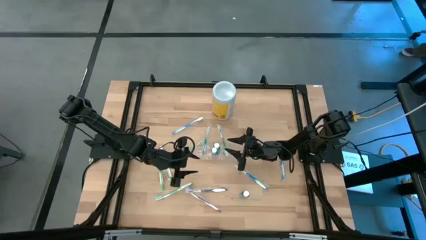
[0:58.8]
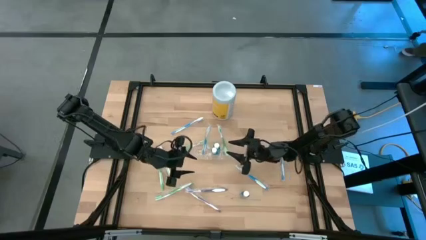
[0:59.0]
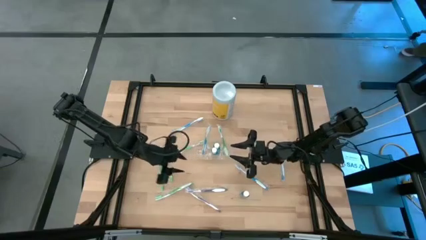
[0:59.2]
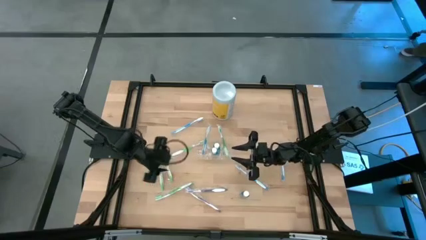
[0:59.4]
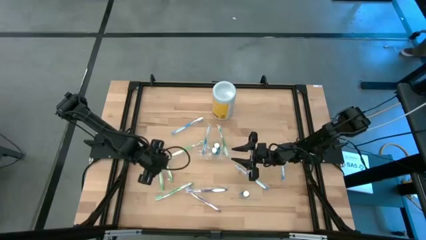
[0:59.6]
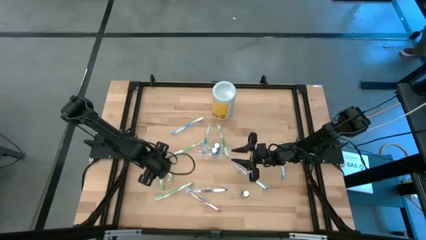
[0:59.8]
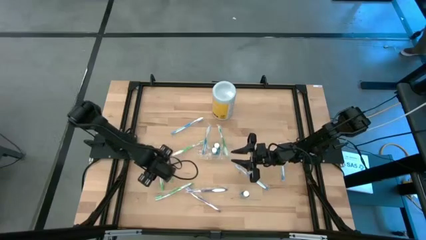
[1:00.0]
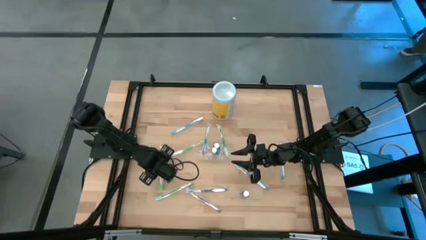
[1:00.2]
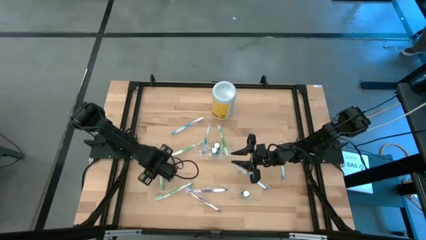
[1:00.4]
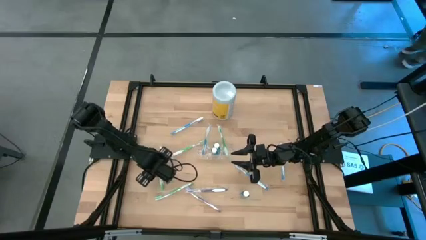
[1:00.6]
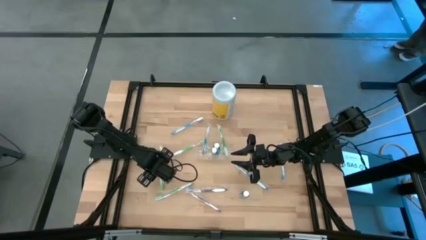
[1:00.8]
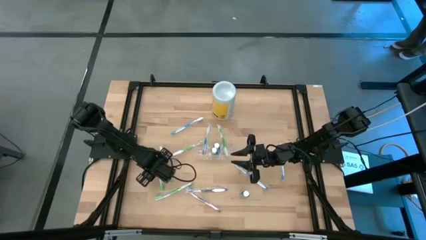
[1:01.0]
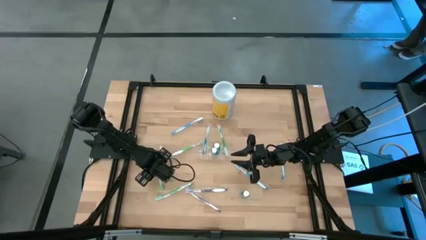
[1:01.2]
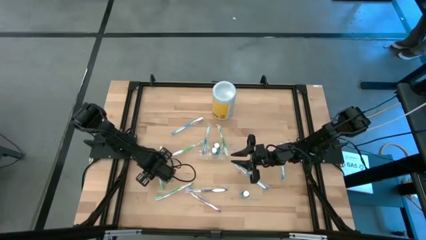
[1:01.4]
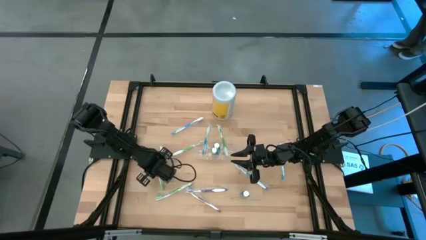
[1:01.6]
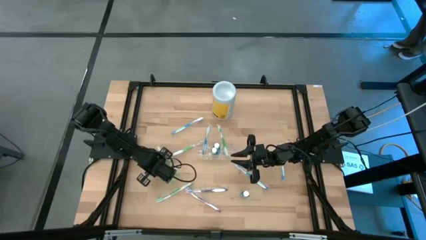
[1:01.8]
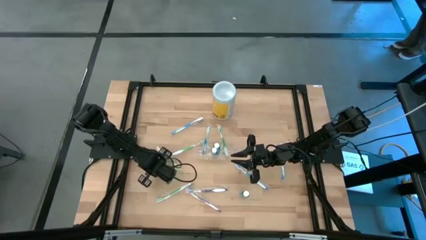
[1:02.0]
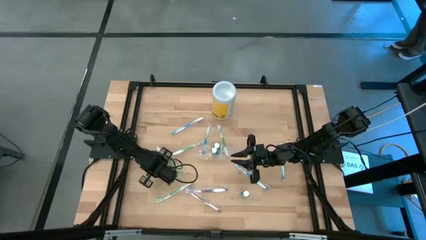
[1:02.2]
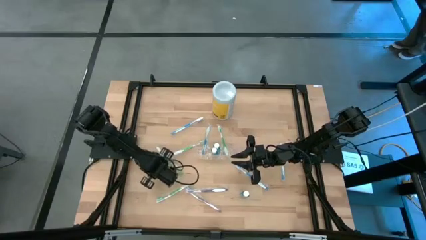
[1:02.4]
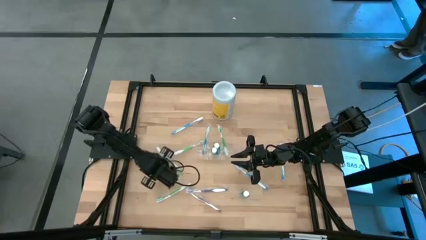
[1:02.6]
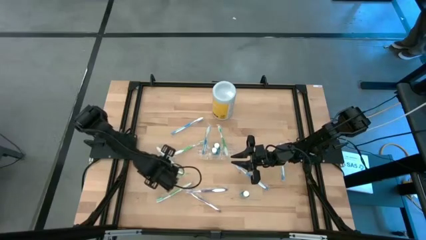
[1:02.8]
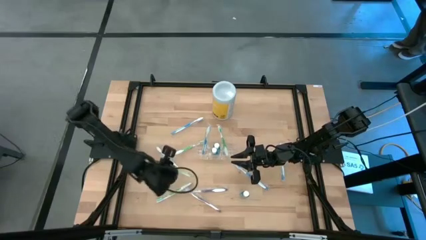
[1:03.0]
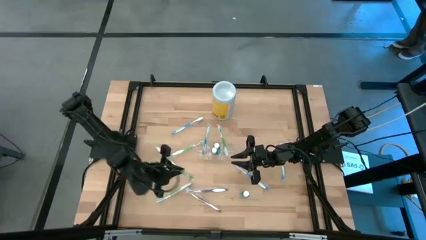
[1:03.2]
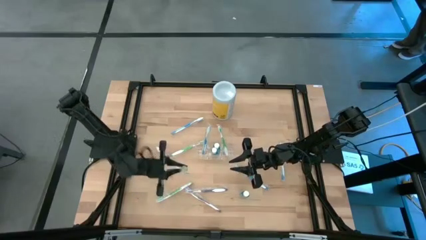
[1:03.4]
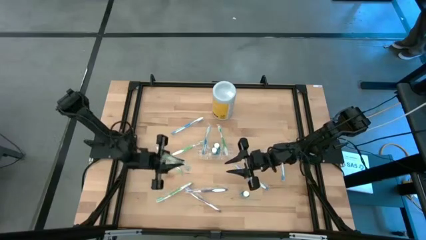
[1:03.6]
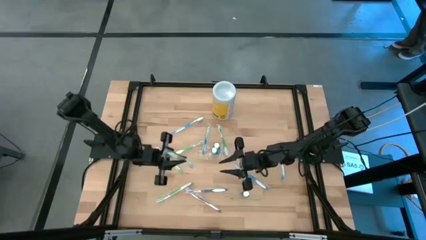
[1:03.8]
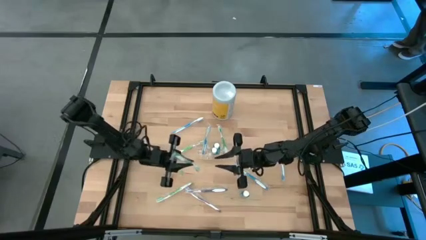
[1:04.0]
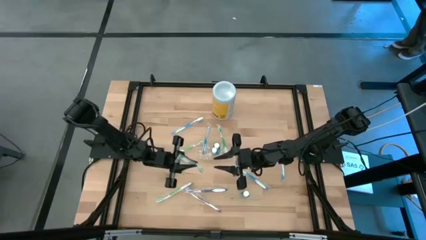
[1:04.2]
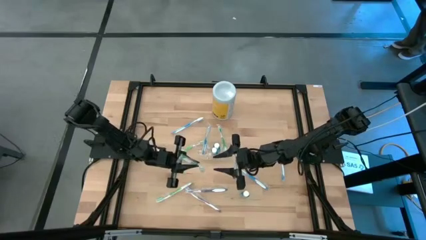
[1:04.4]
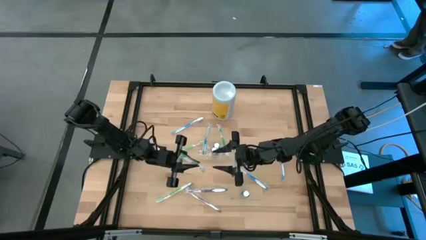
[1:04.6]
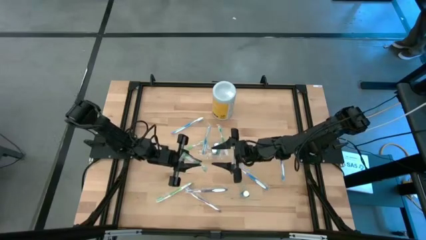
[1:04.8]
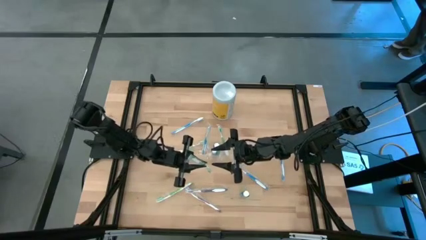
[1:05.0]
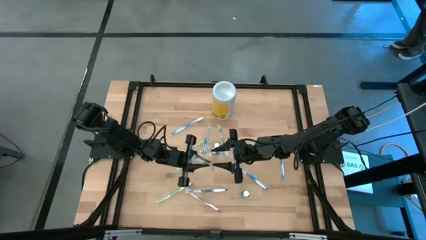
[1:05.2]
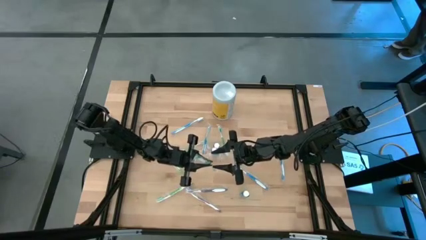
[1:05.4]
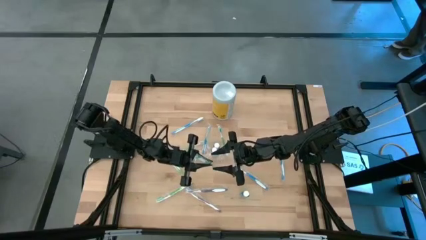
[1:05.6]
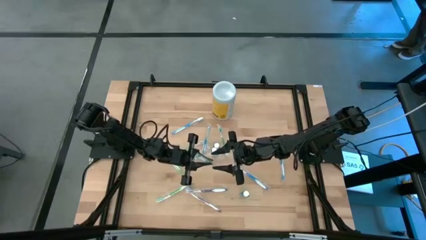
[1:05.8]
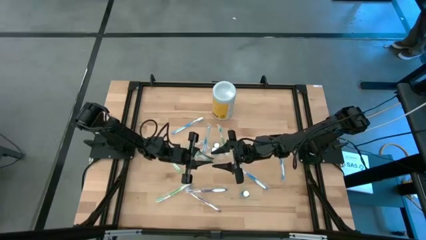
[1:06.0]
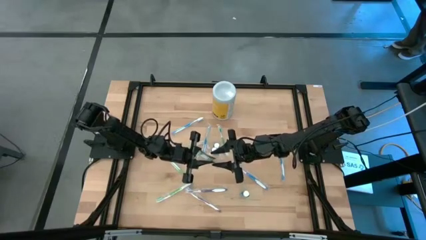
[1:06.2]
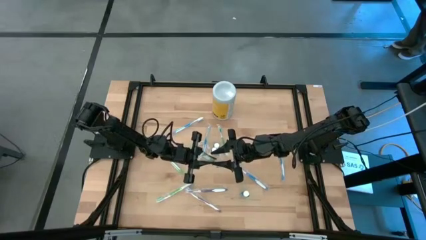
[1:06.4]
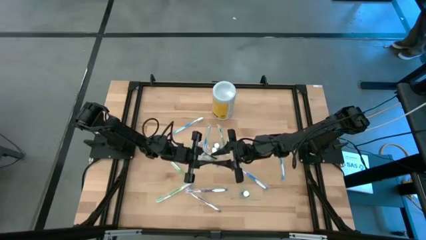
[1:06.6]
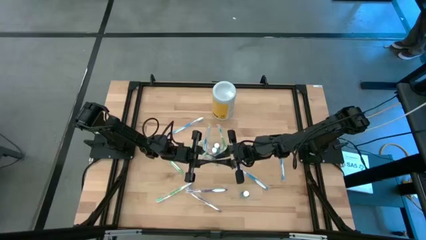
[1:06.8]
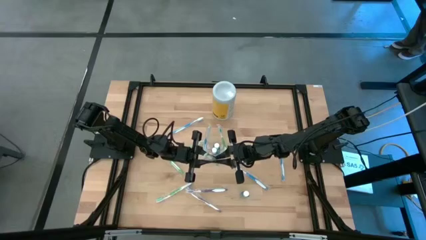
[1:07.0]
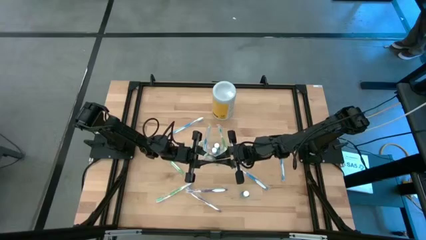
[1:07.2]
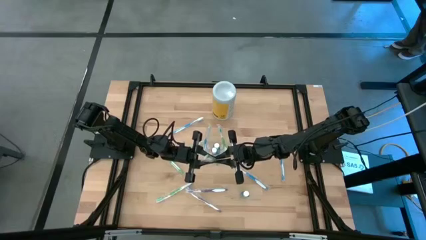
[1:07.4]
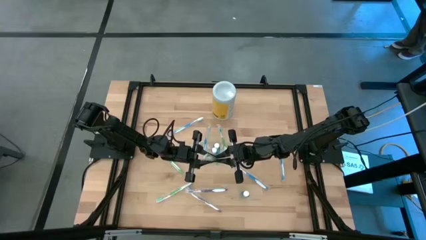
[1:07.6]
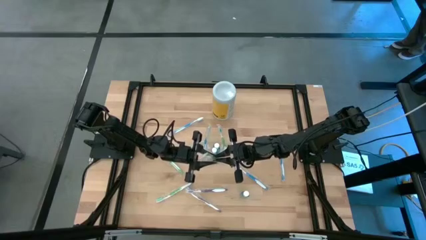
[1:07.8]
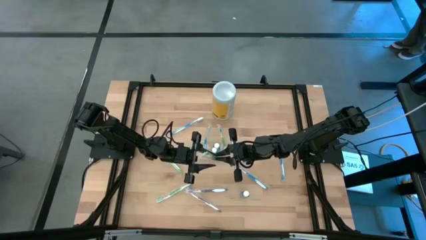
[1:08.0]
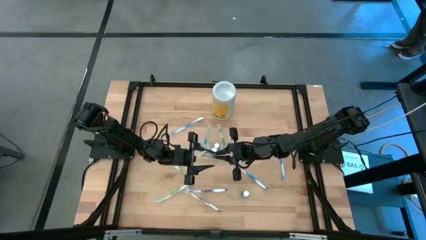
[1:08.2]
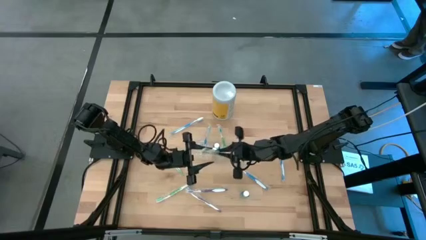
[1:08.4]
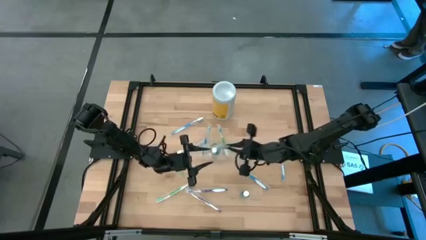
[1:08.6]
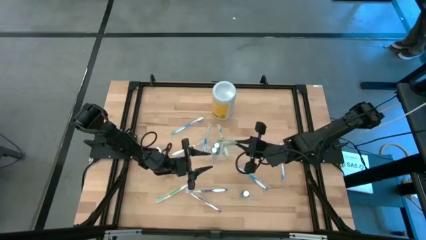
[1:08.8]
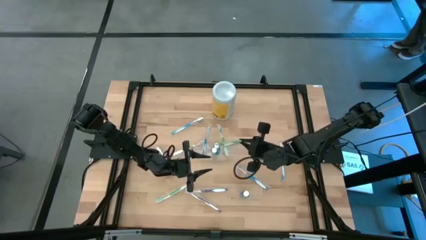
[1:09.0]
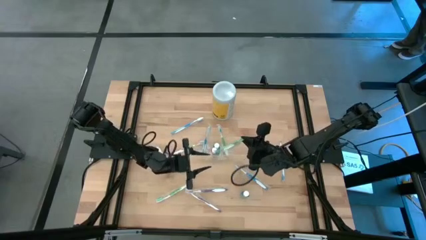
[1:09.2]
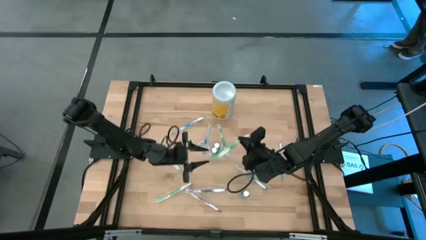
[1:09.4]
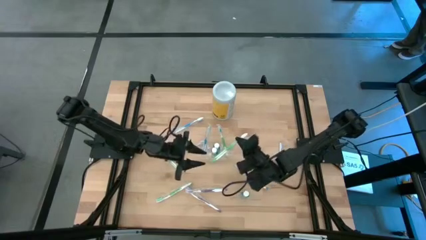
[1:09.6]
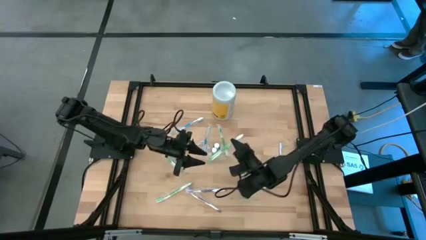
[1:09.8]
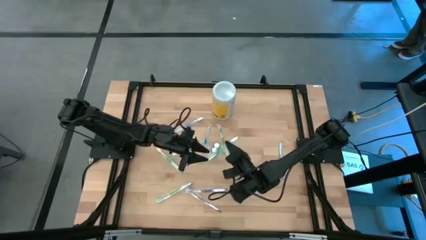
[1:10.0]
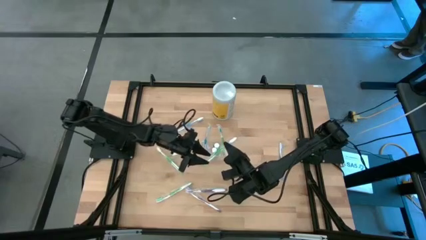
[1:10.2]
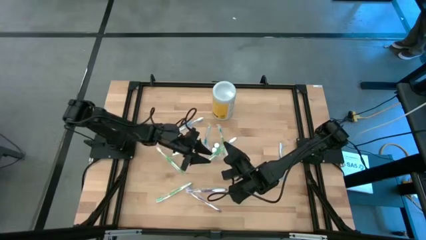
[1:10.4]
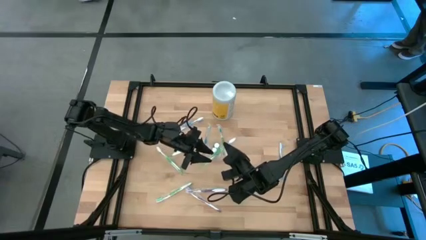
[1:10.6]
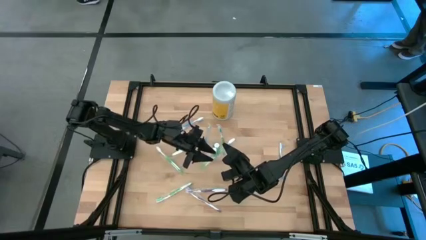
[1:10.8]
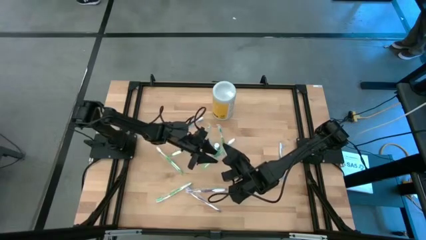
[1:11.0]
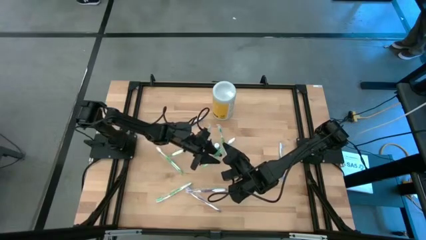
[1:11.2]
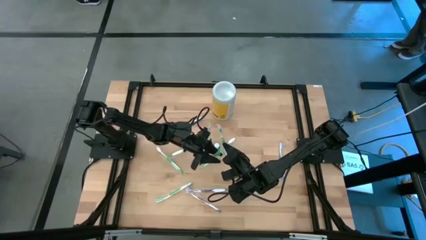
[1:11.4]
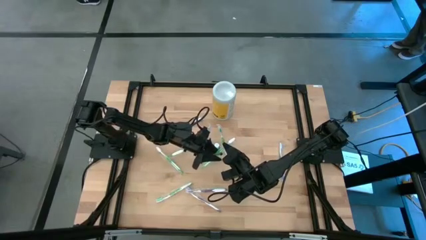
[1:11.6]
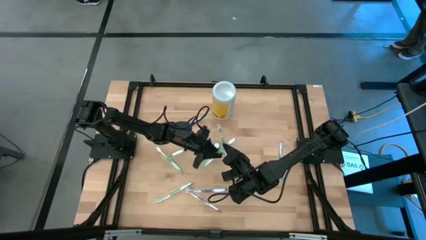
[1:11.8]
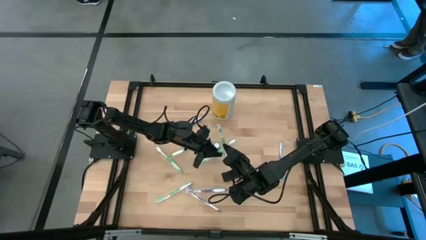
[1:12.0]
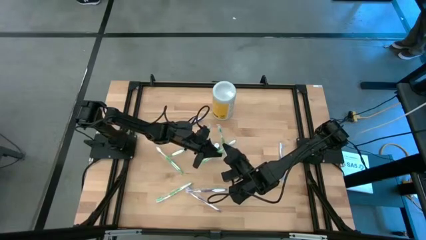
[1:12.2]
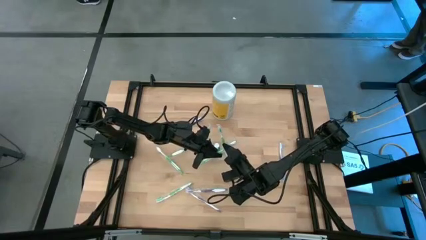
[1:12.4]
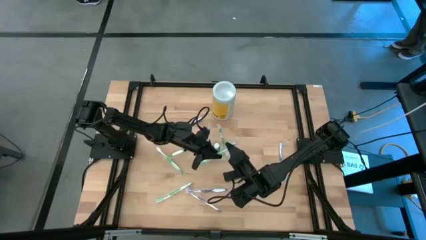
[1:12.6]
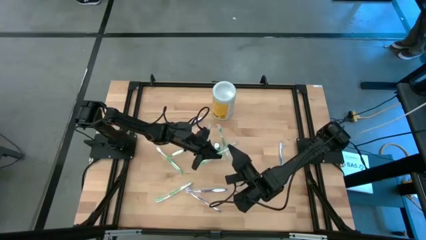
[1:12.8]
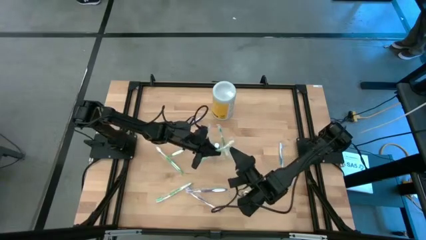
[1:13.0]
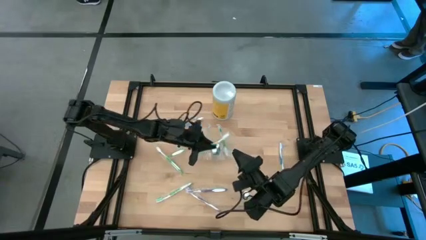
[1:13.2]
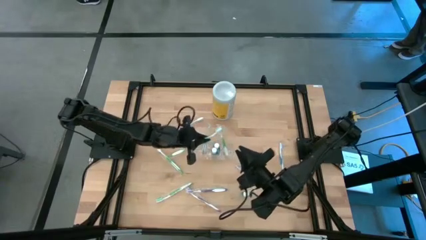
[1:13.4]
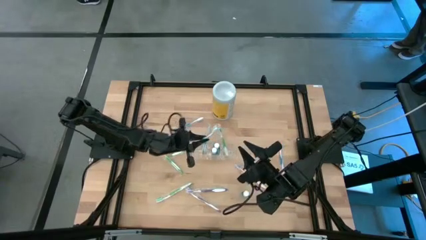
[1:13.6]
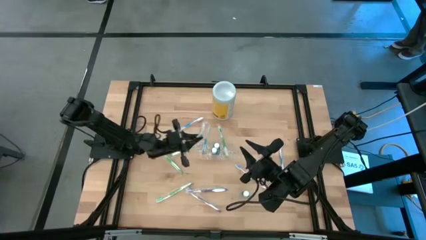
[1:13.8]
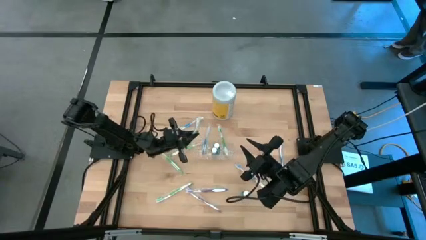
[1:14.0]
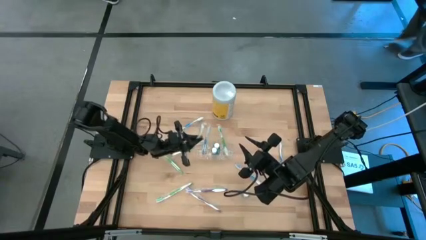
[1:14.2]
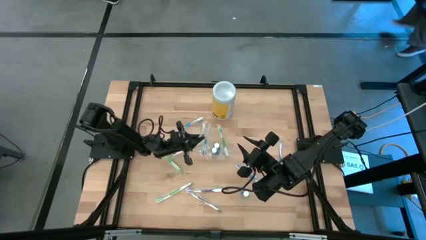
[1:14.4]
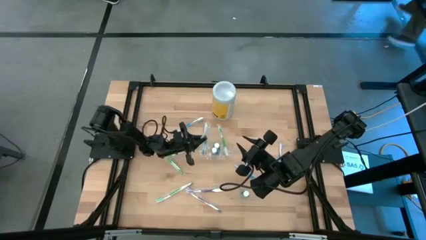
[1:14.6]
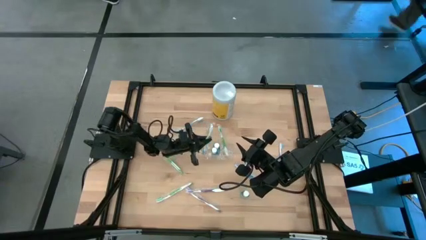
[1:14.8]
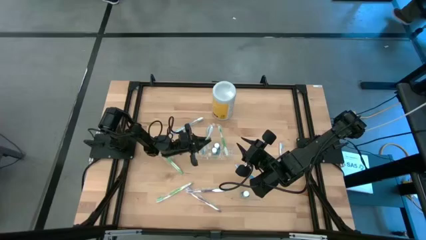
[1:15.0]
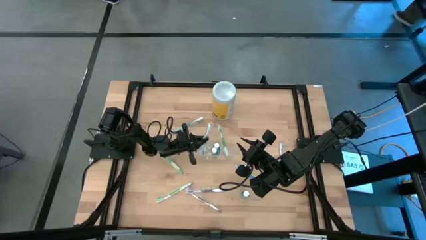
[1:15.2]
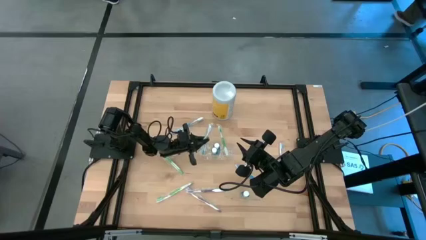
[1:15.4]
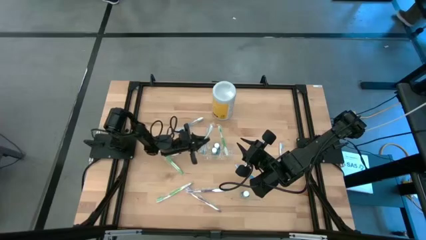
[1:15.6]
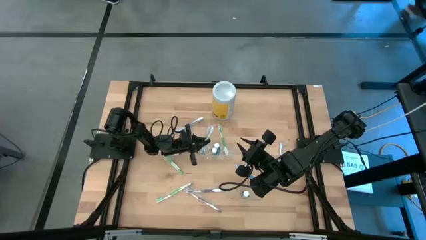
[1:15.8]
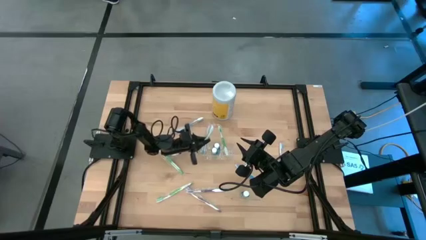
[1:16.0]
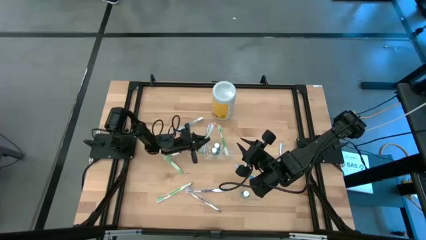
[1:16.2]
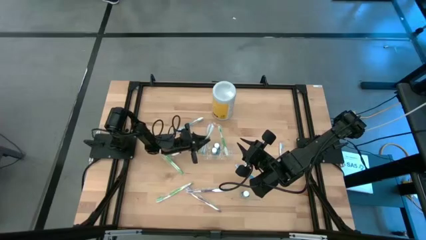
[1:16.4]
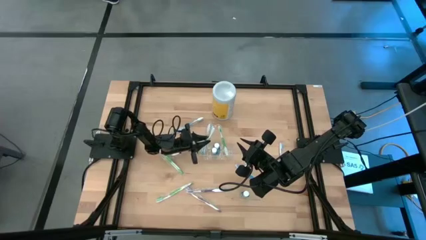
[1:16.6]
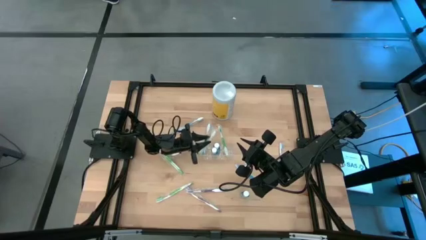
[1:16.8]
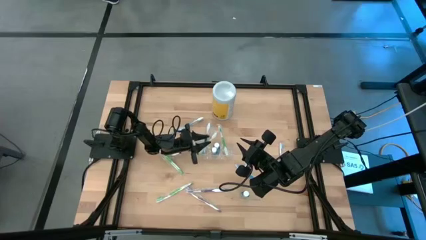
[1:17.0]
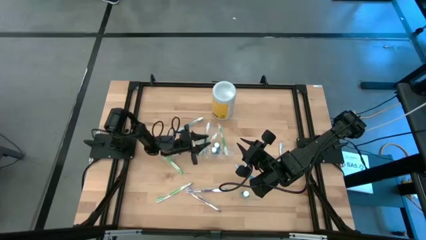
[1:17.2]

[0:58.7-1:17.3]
Task: Pick & Place toothbrushing station
Put the green toothbrush into the transparent organizer
